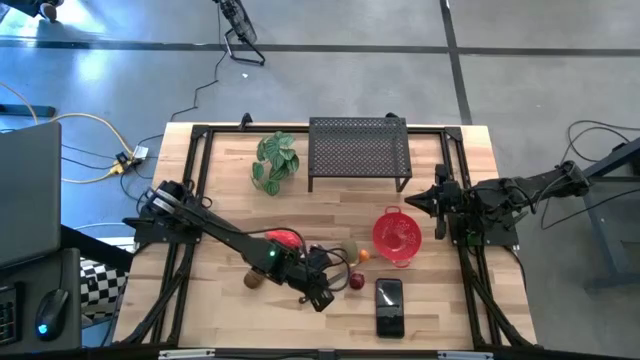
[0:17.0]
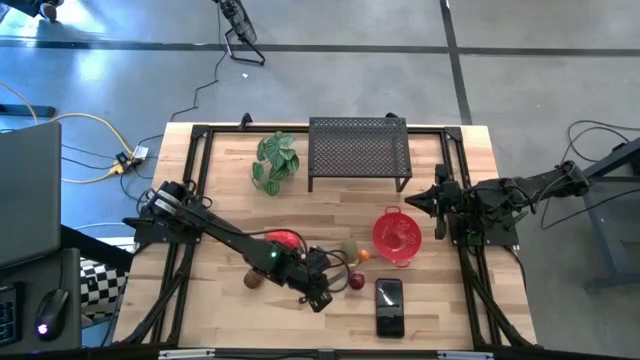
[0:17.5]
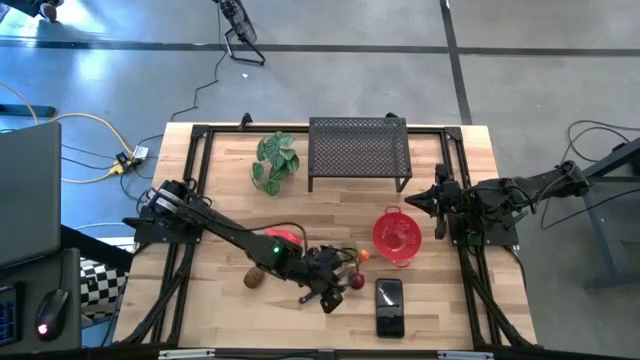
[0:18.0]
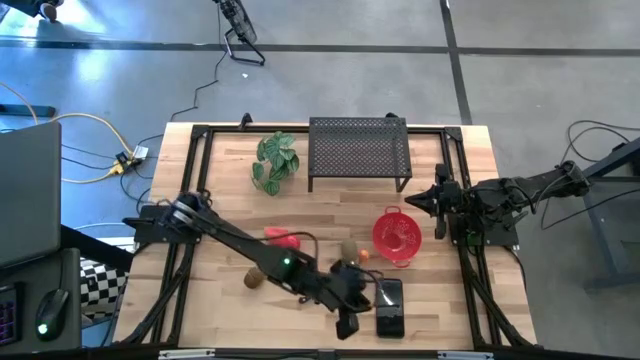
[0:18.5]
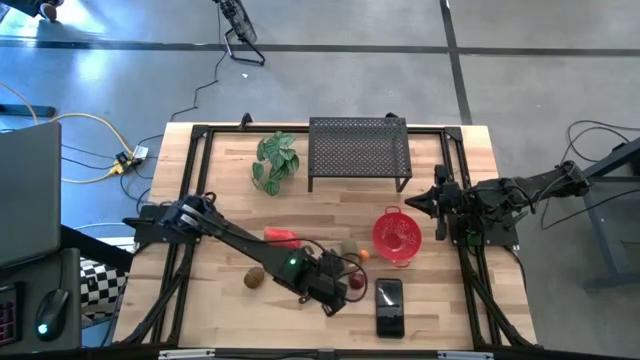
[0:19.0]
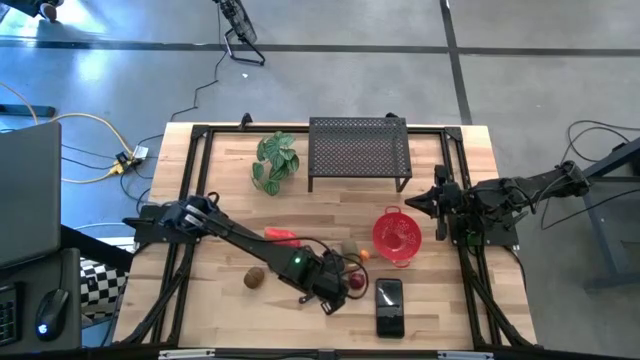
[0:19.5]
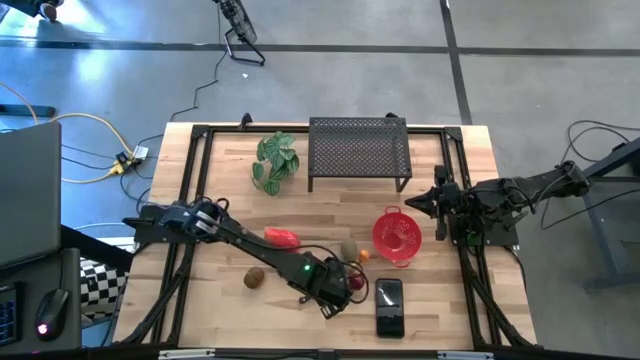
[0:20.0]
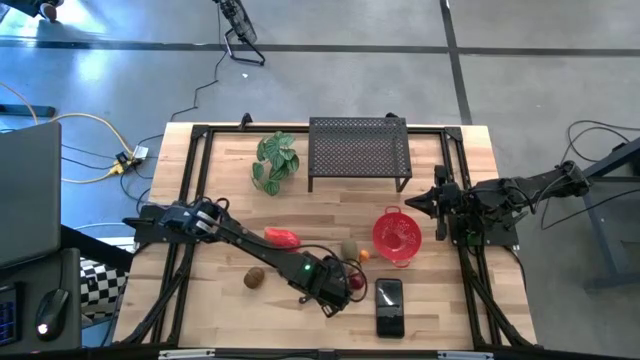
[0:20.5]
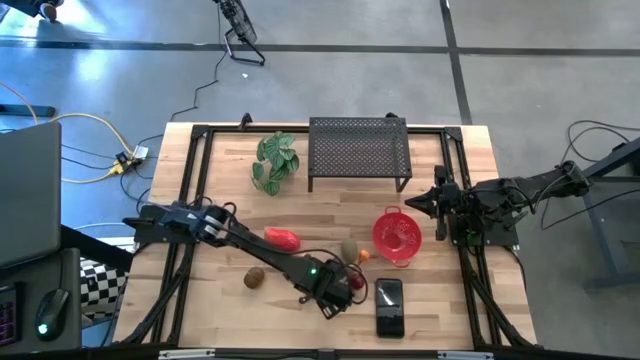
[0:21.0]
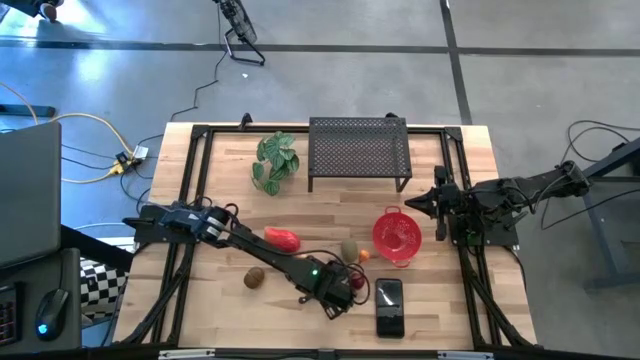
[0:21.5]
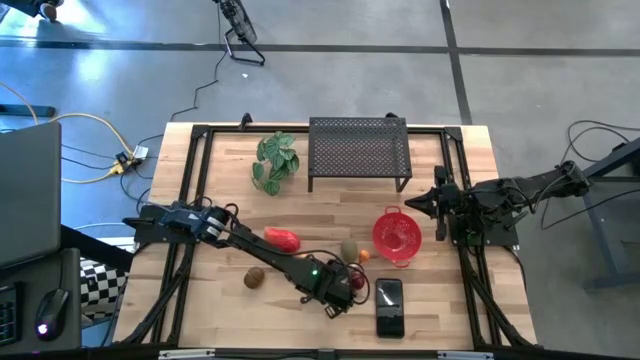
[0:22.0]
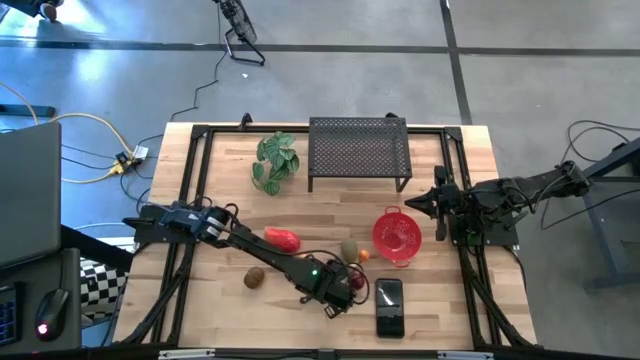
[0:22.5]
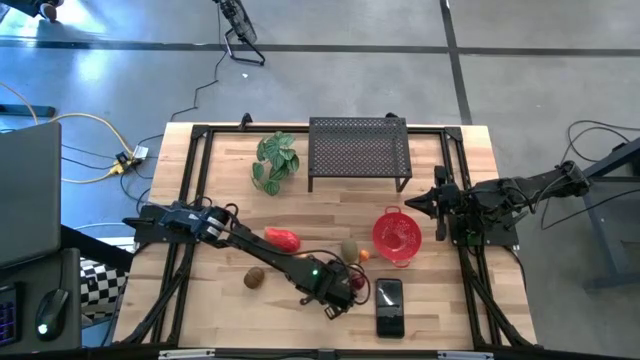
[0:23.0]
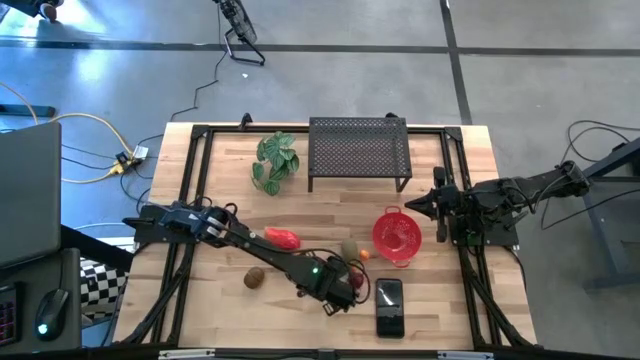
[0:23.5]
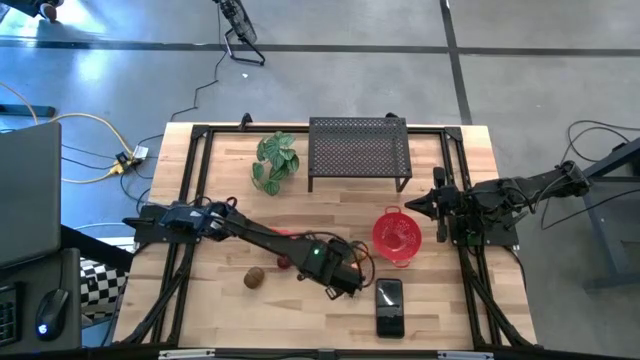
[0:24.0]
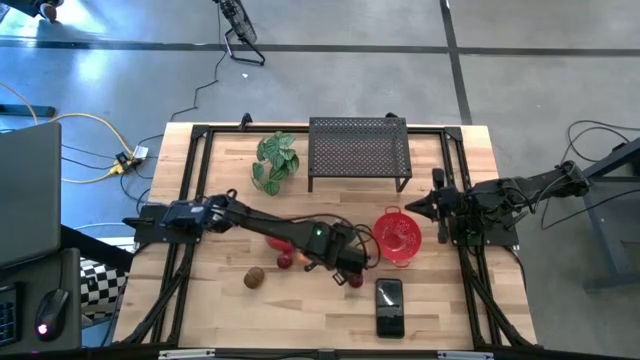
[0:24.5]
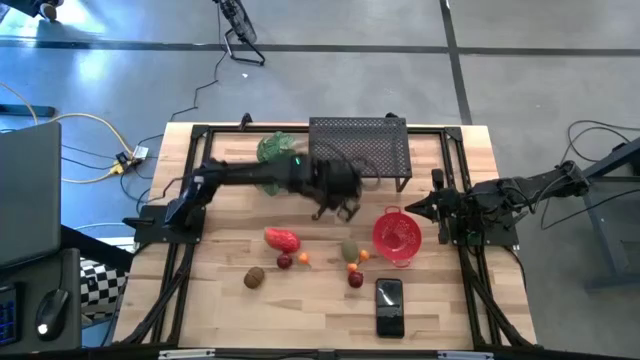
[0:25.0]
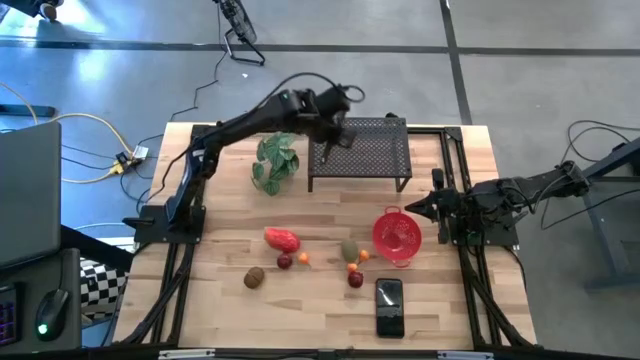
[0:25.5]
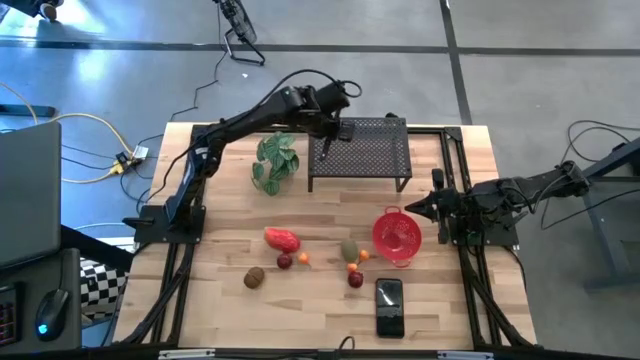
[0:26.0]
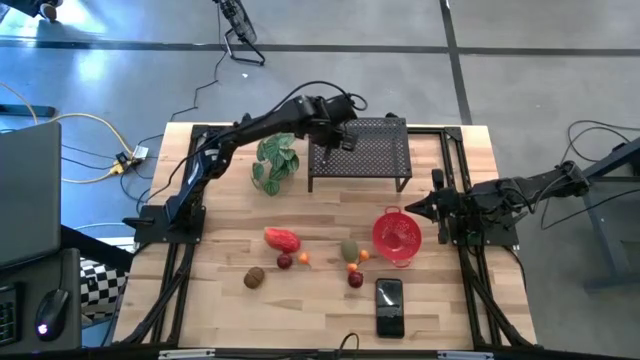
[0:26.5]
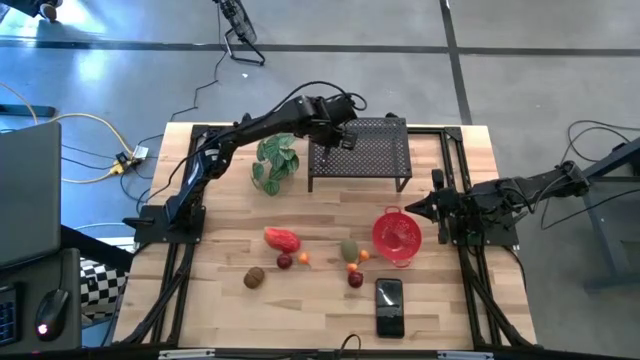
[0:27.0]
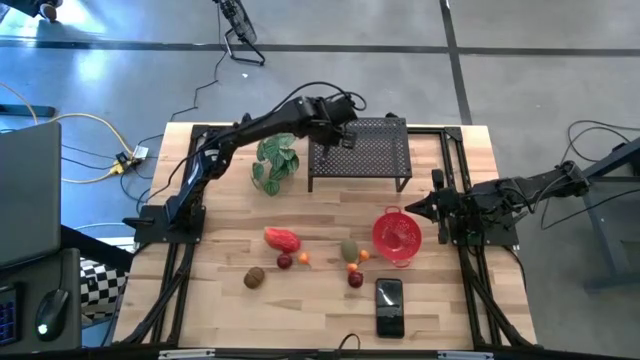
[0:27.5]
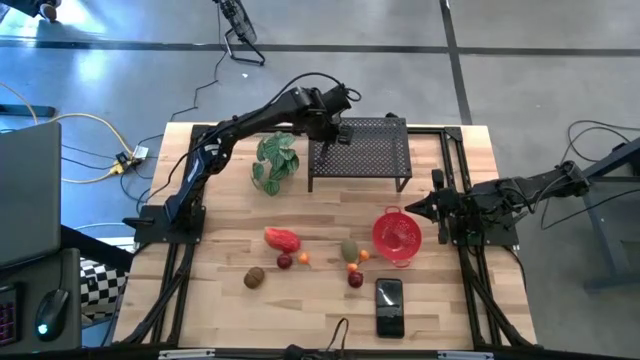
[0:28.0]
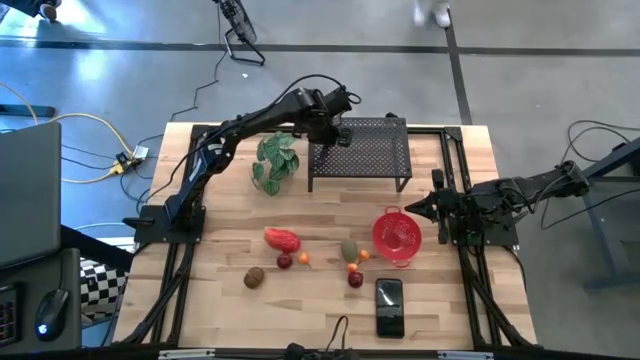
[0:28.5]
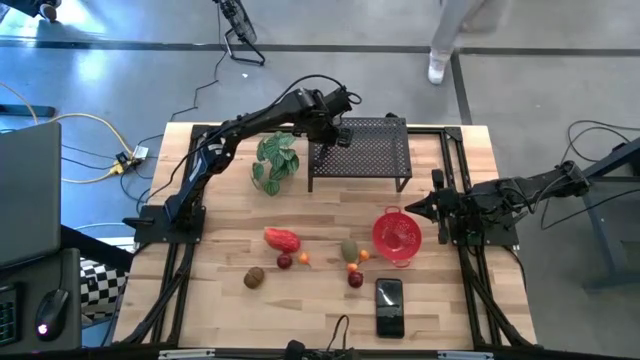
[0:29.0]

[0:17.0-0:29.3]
Task: Pick & Place Fruit
Put the black knife on the shelf
